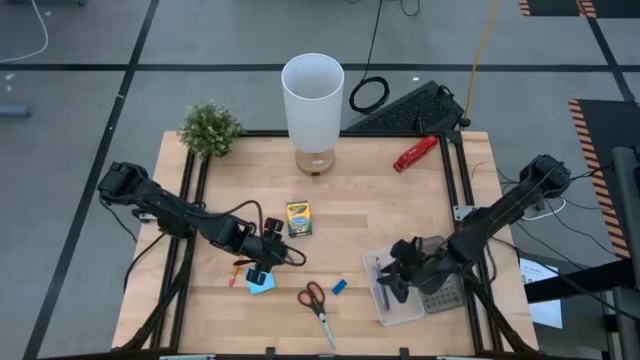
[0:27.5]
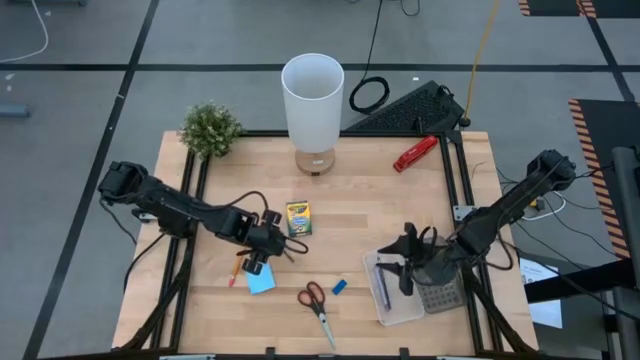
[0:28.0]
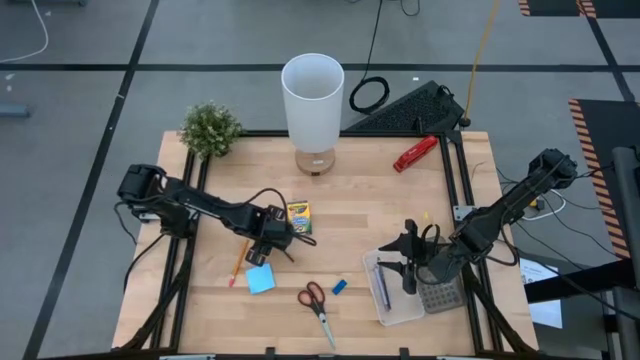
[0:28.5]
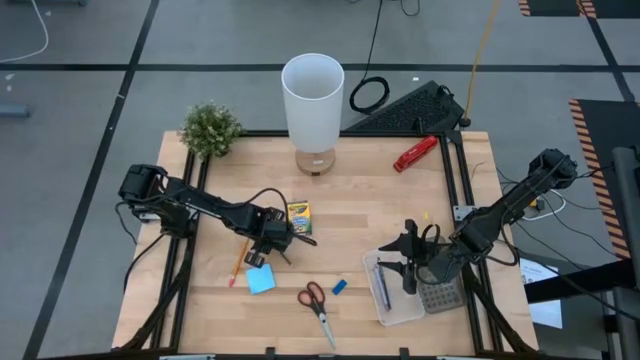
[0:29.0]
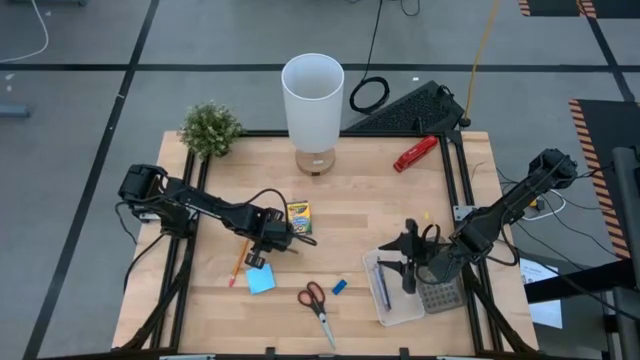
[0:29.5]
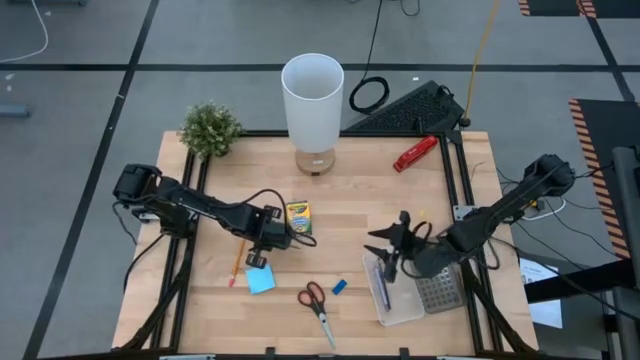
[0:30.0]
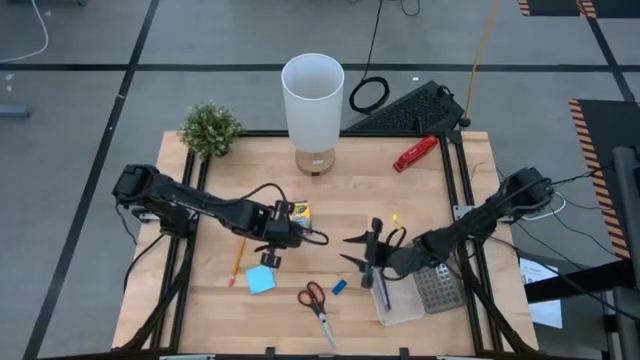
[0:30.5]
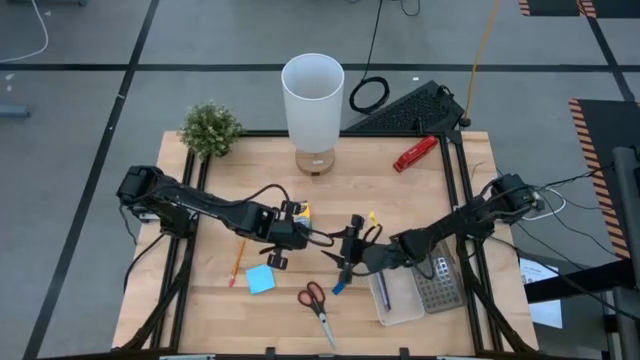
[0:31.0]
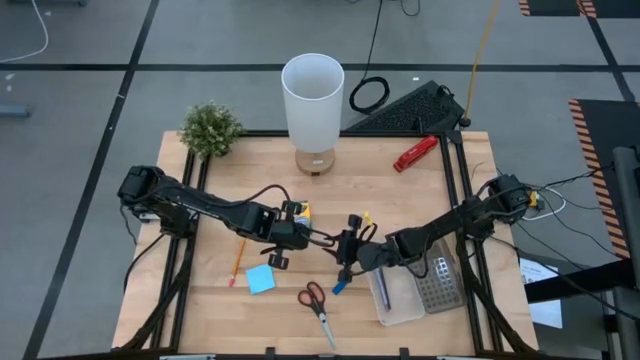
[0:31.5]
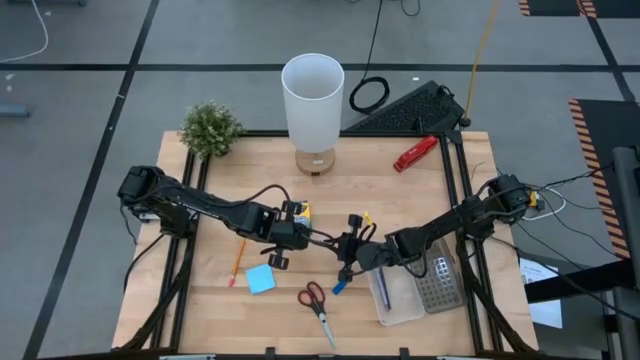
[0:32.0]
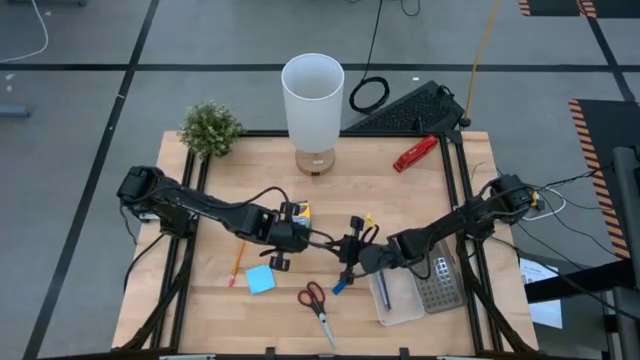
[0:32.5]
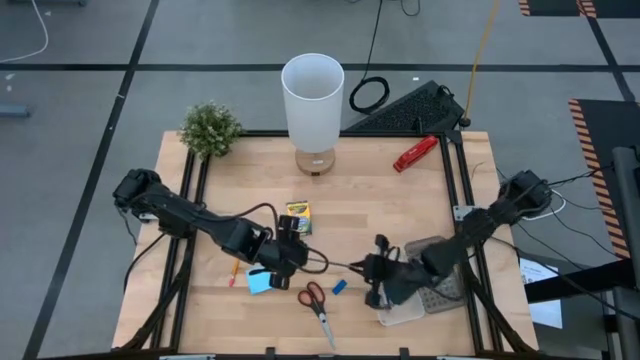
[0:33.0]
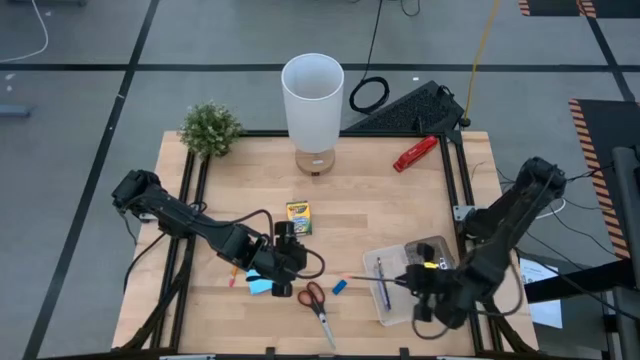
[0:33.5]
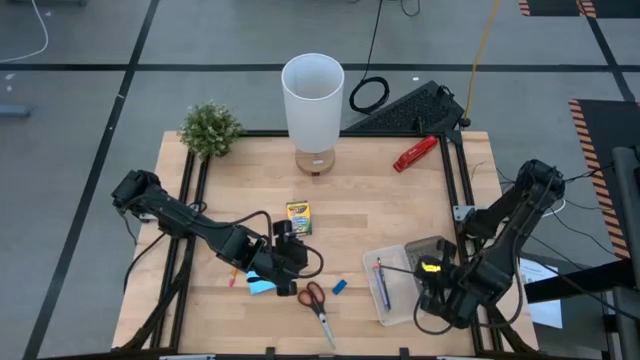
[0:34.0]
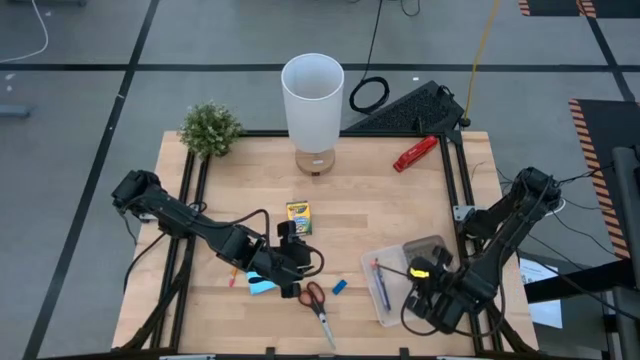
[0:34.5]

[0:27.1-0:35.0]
Task: Pack school essentials
Put the black pencil into the supplies box

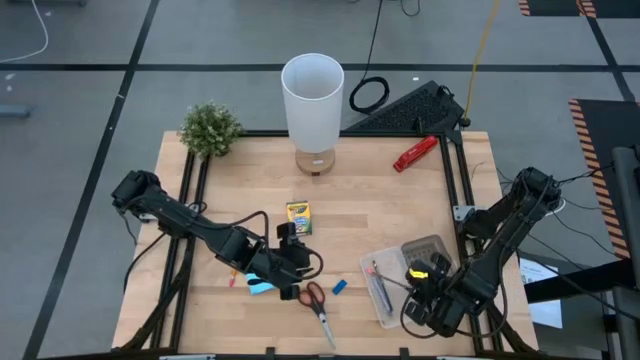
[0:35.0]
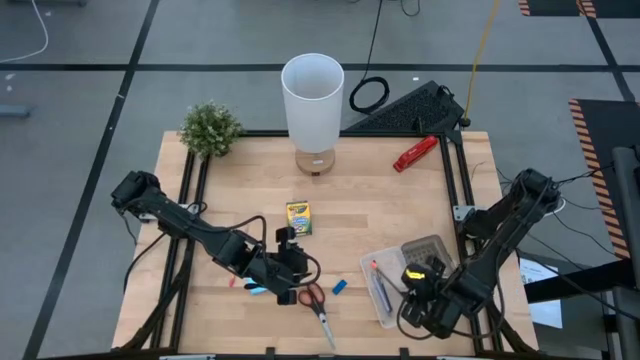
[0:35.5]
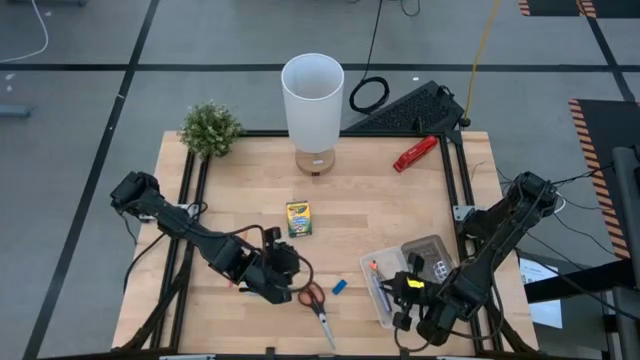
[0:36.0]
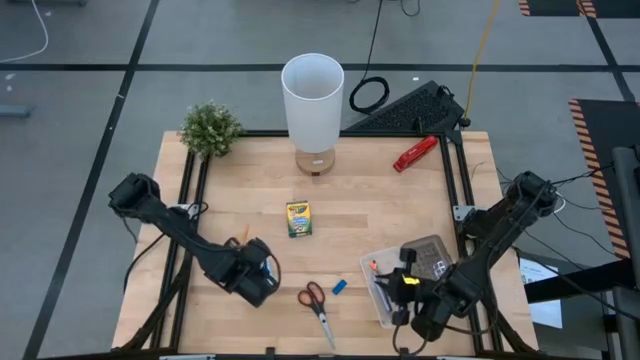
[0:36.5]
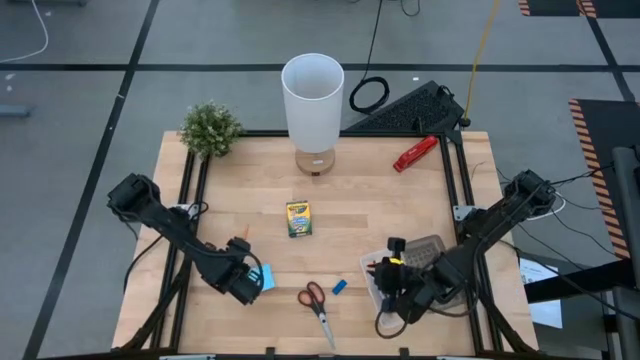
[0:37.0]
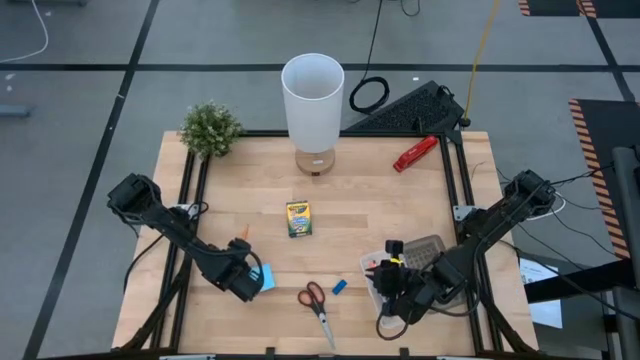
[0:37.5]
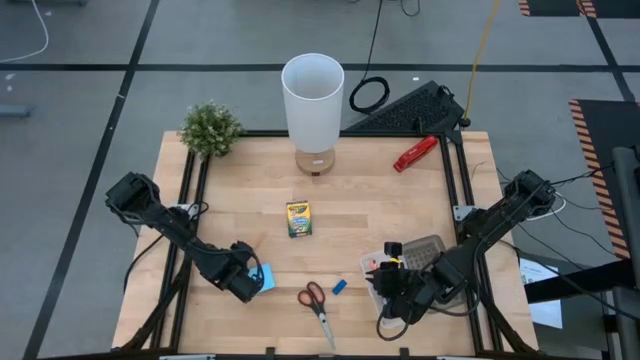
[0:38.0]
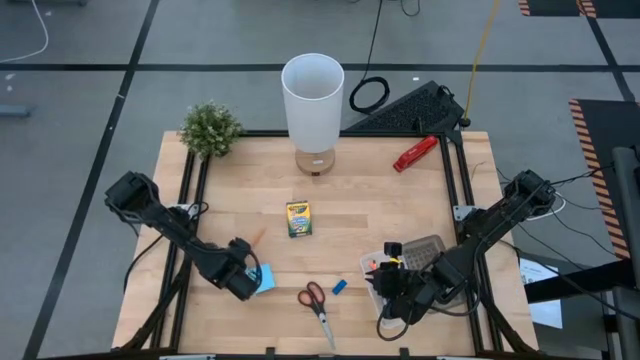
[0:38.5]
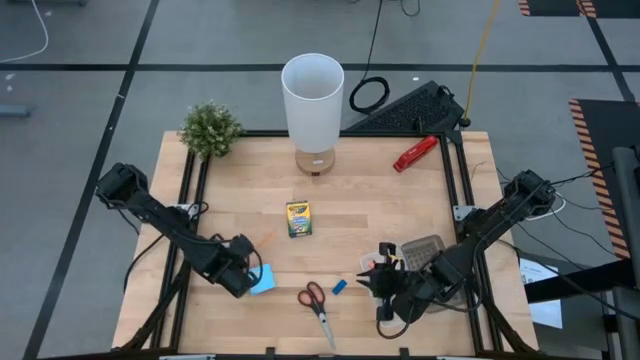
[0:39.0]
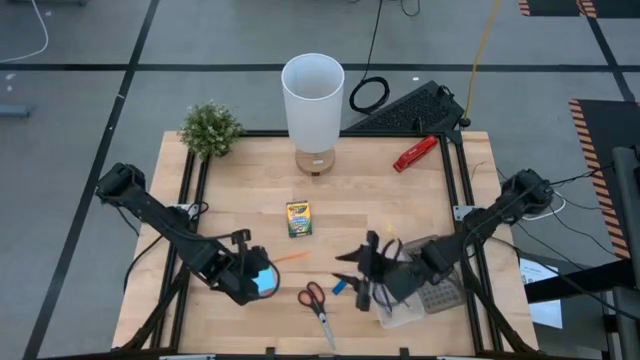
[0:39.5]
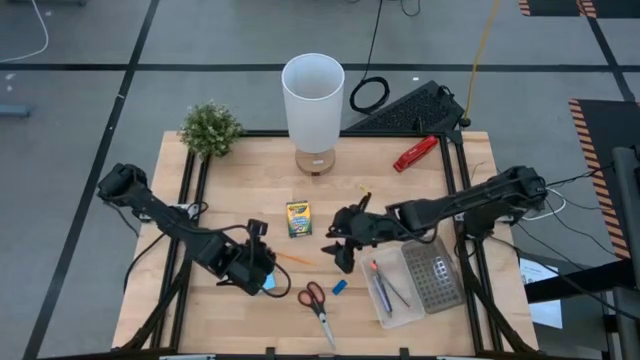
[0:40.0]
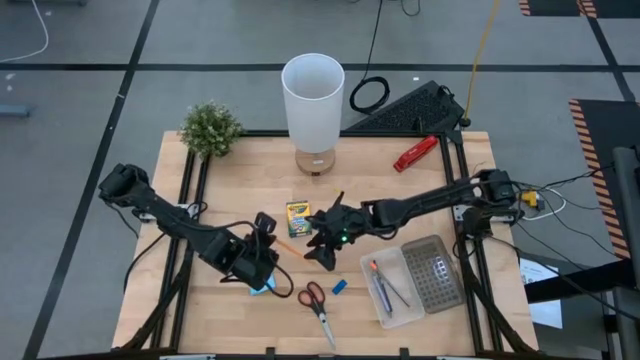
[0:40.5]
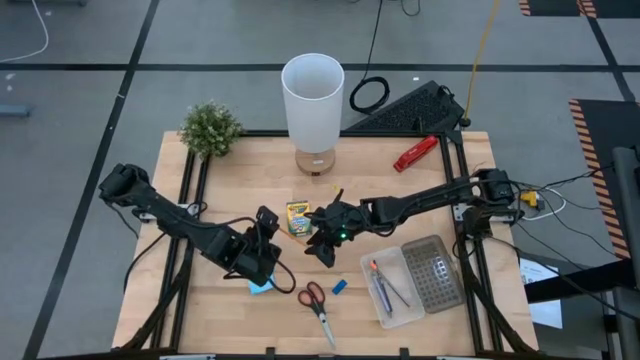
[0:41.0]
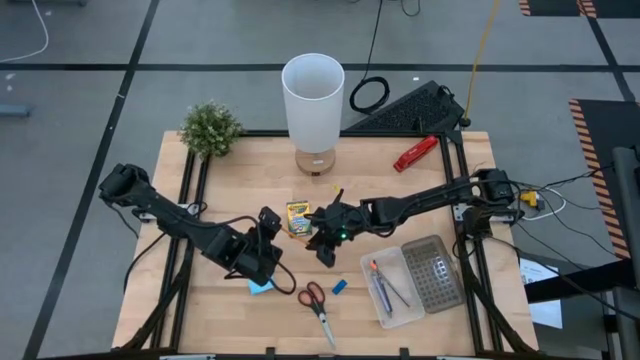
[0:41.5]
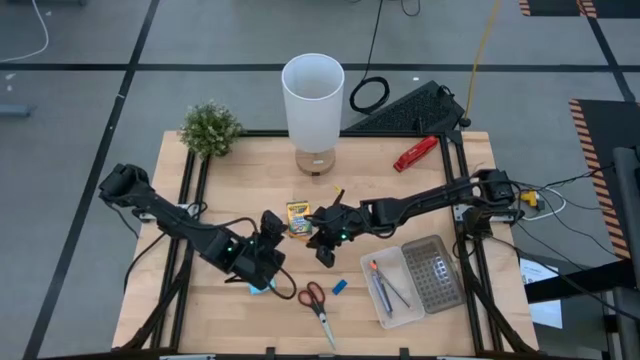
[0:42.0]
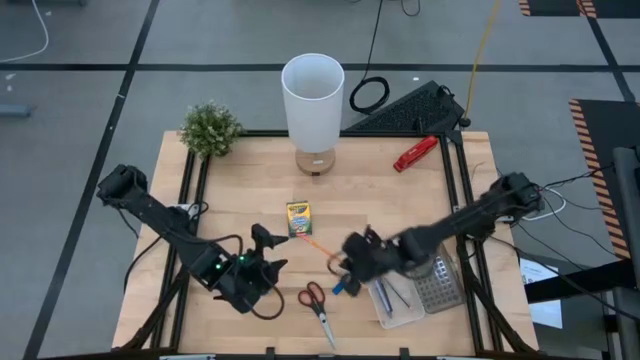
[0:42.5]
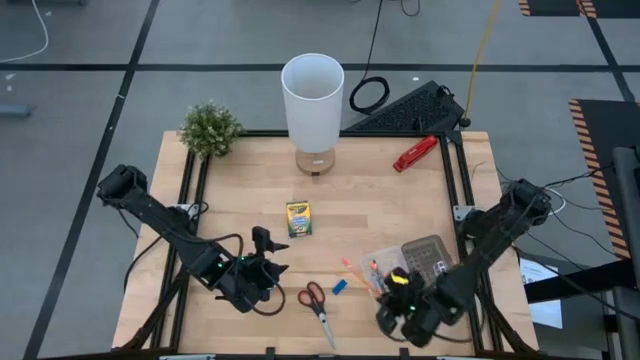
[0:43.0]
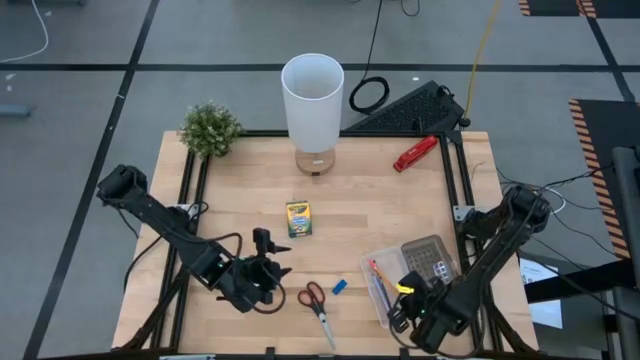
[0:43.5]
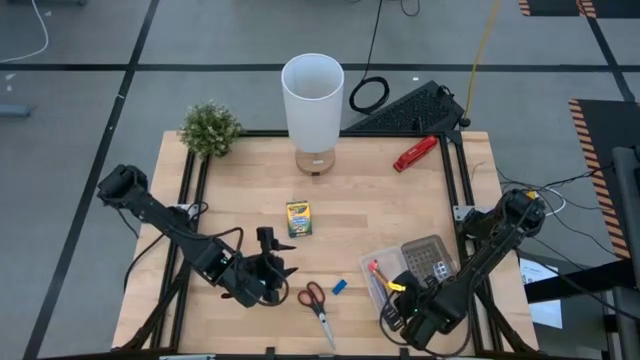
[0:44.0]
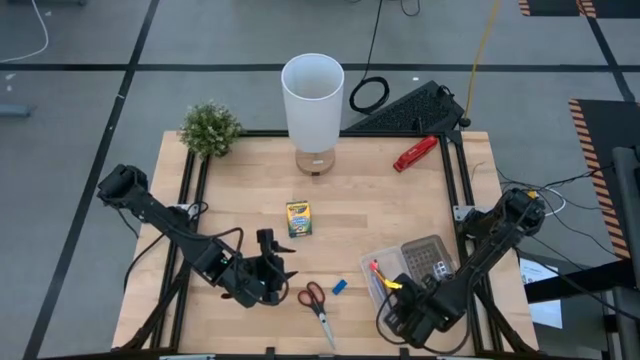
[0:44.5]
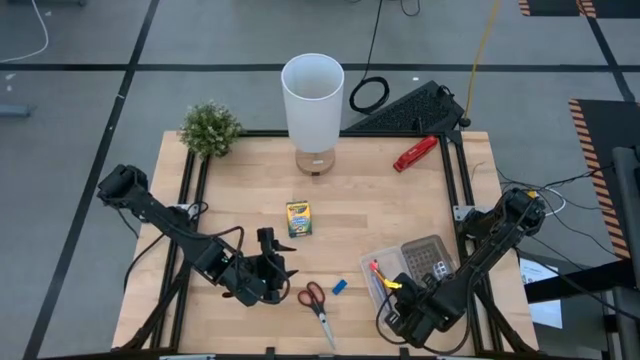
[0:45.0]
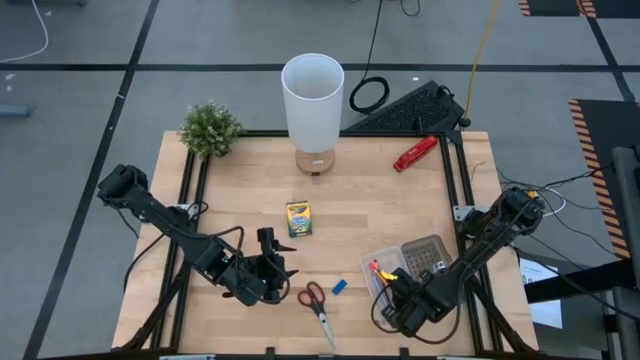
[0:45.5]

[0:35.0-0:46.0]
Put the yellow pencil into the supplies box

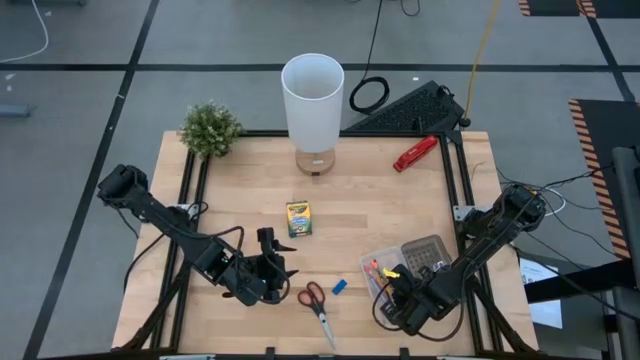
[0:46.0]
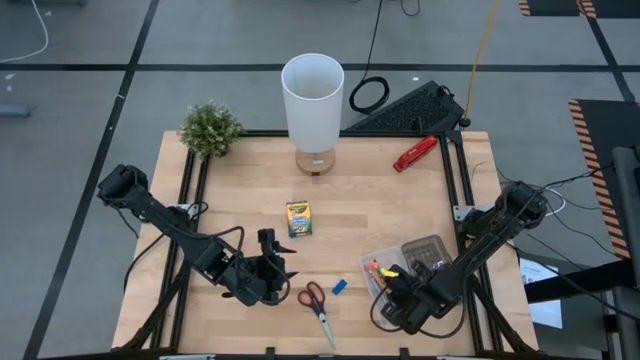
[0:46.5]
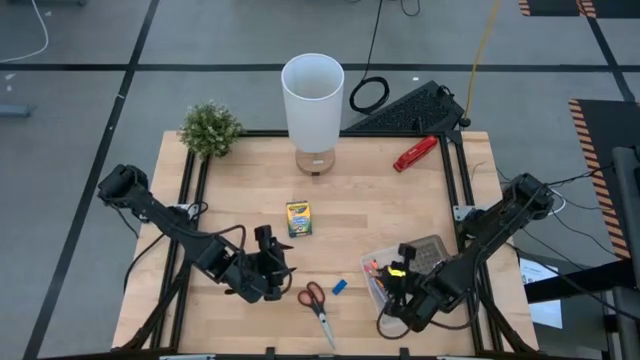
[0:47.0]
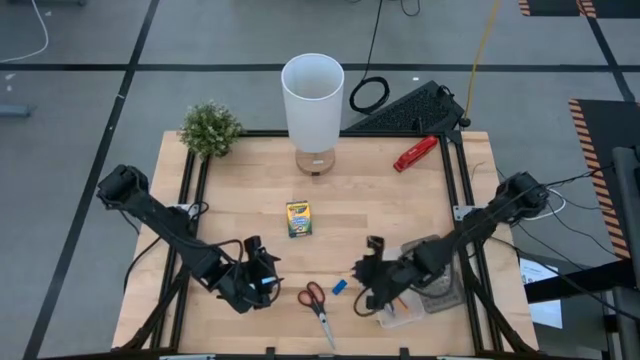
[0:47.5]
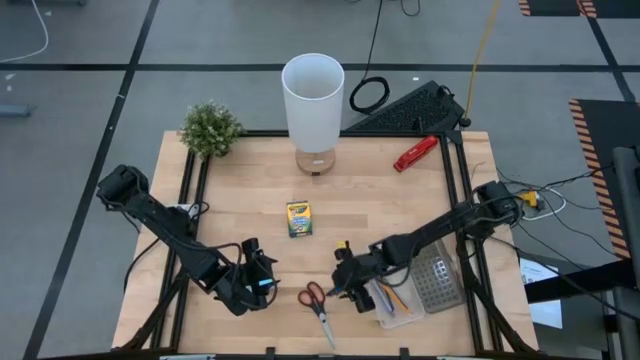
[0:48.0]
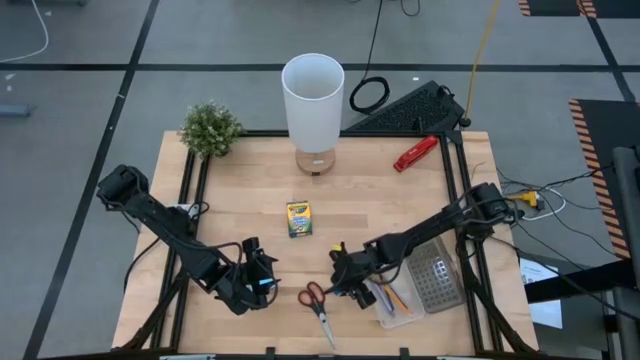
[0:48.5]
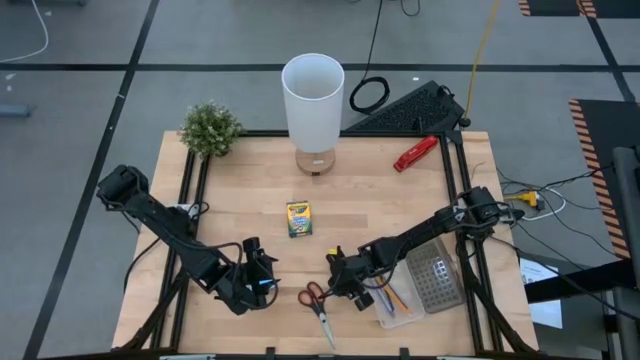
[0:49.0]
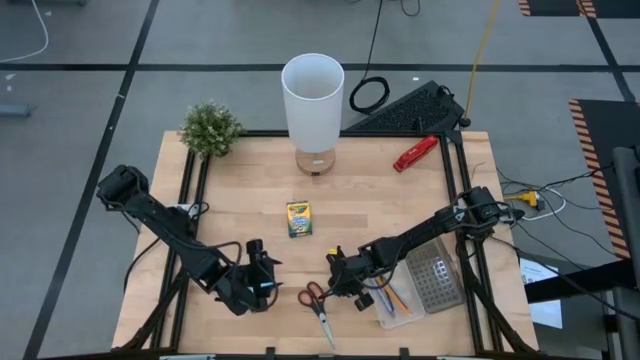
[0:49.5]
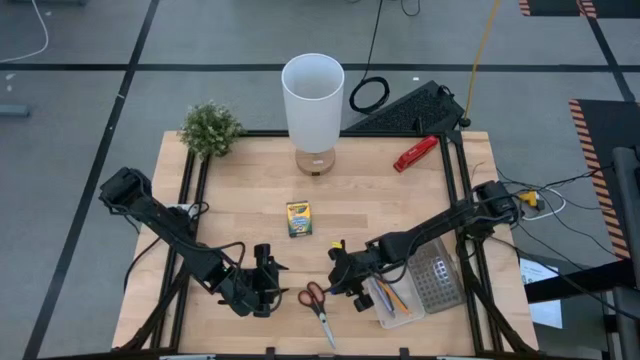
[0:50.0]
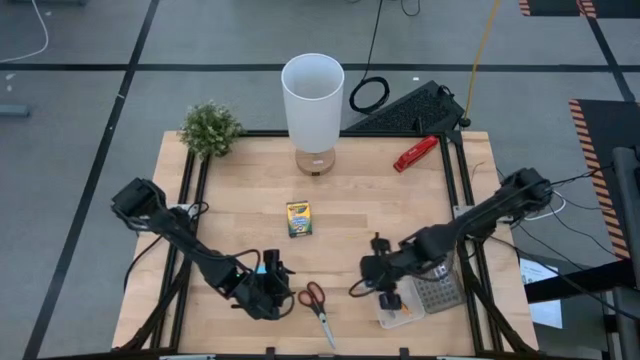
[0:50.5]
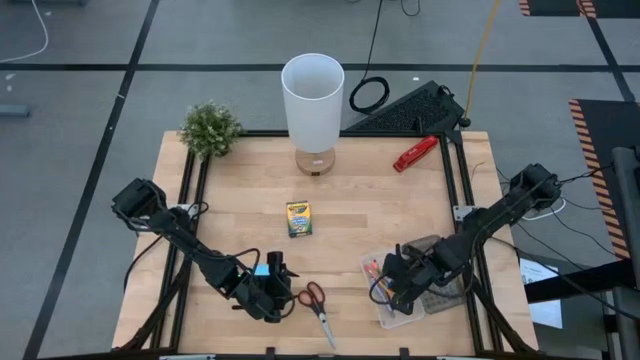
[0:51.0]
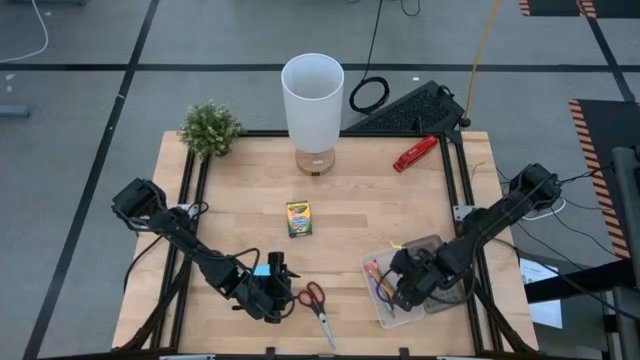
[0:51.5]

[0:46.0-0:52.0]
Put the blue eraser into the supplies box
